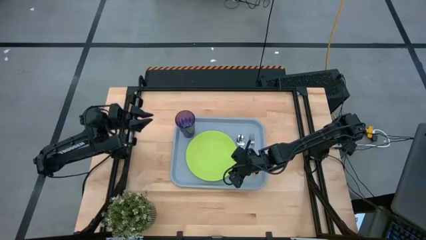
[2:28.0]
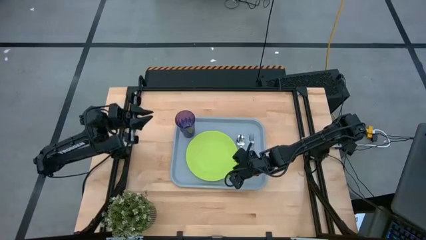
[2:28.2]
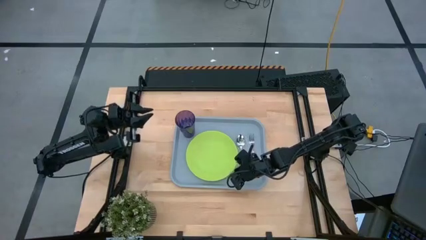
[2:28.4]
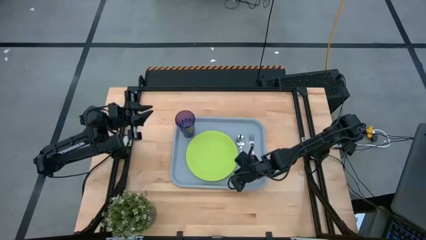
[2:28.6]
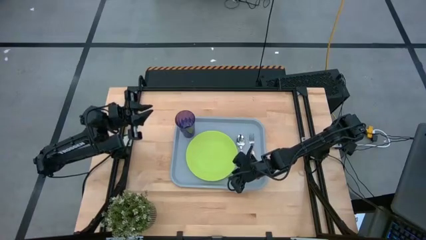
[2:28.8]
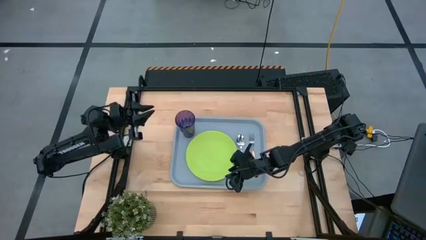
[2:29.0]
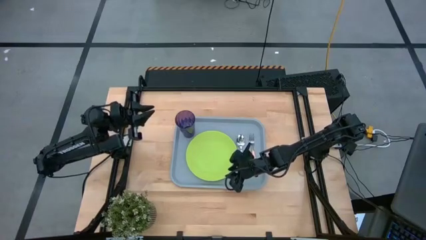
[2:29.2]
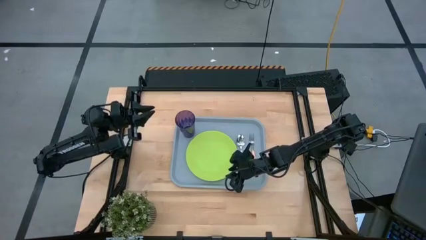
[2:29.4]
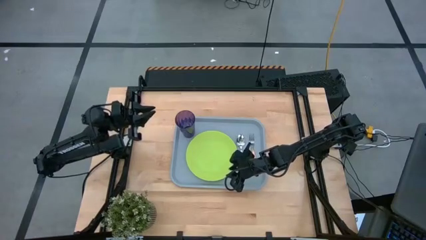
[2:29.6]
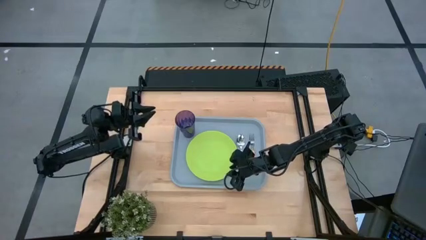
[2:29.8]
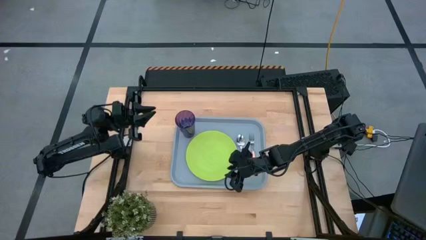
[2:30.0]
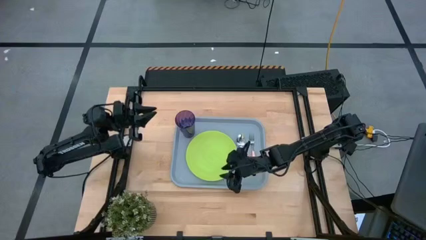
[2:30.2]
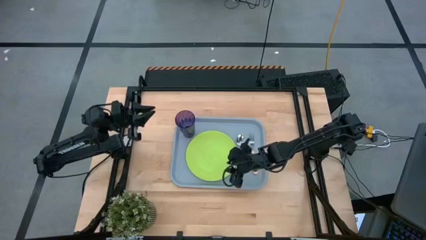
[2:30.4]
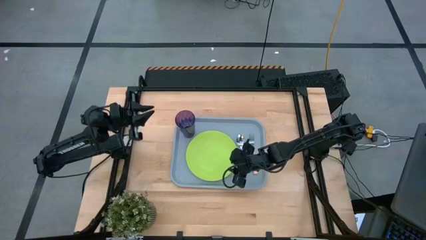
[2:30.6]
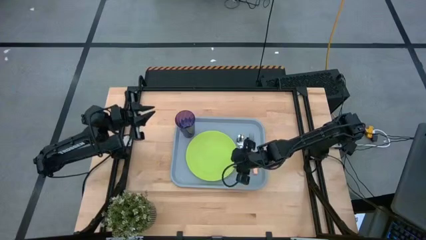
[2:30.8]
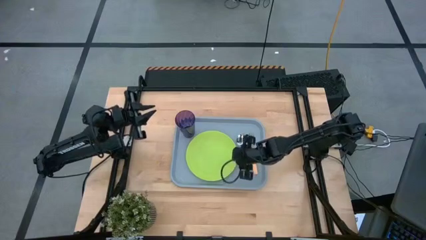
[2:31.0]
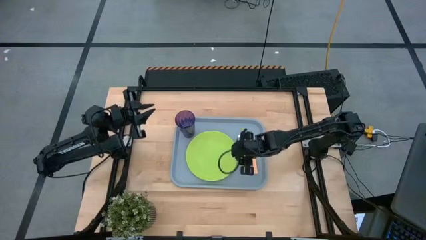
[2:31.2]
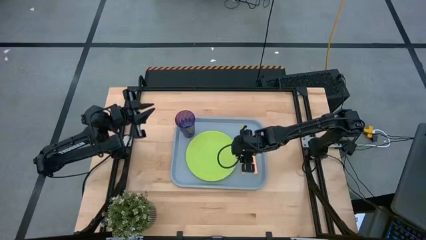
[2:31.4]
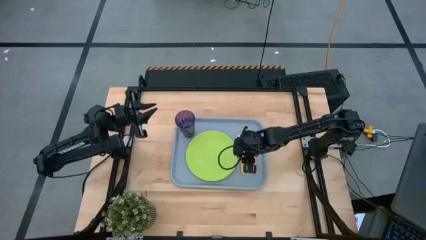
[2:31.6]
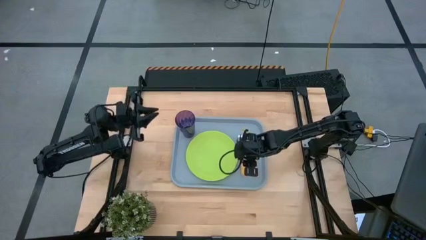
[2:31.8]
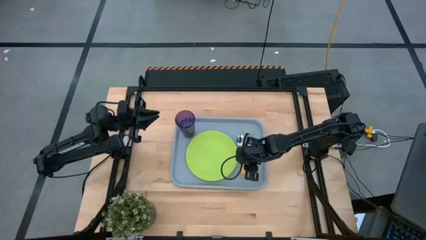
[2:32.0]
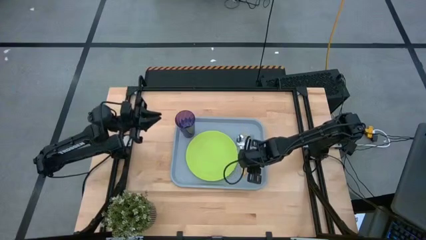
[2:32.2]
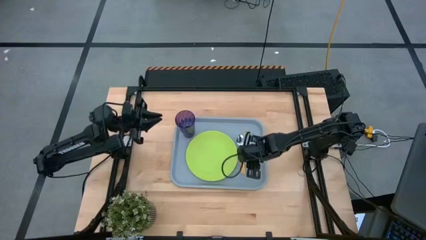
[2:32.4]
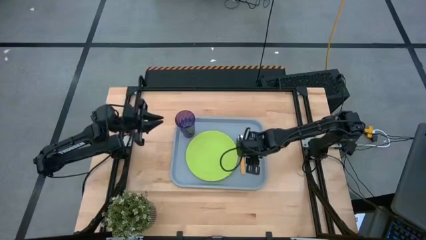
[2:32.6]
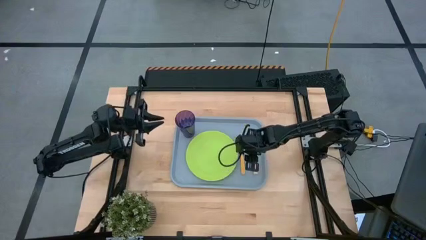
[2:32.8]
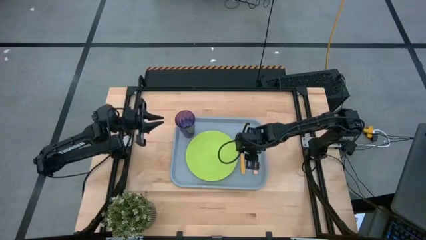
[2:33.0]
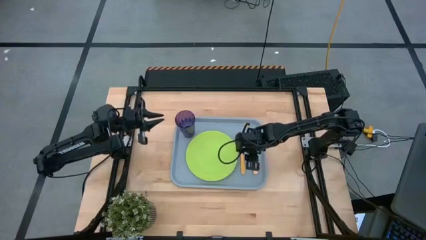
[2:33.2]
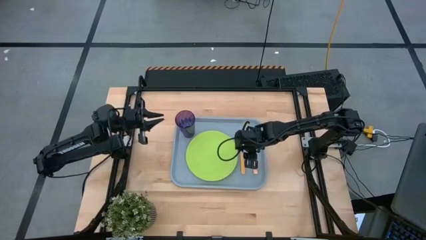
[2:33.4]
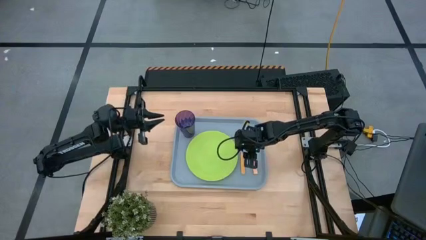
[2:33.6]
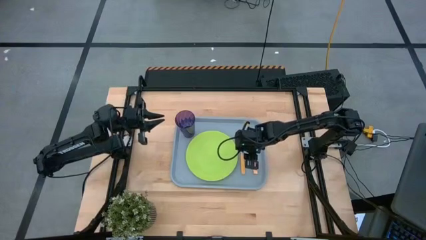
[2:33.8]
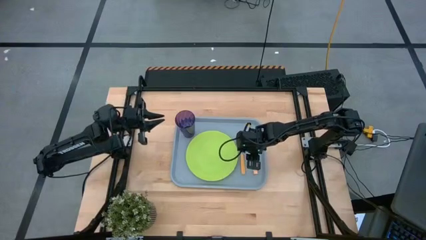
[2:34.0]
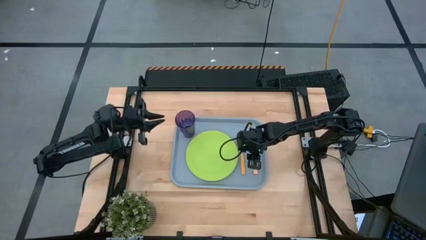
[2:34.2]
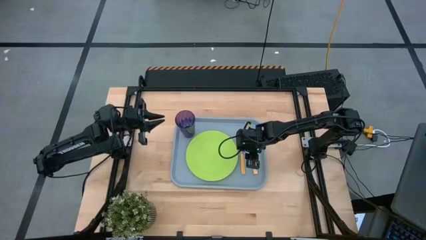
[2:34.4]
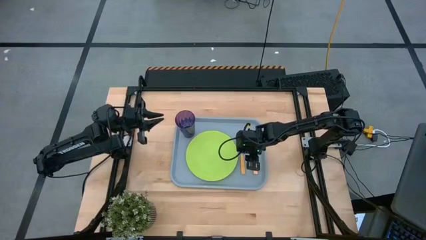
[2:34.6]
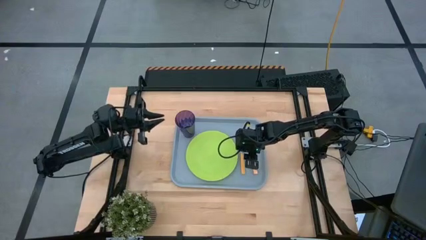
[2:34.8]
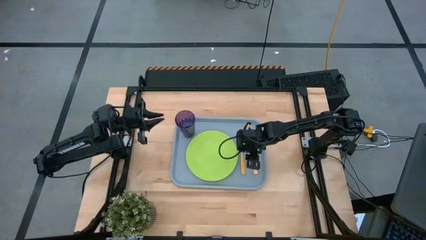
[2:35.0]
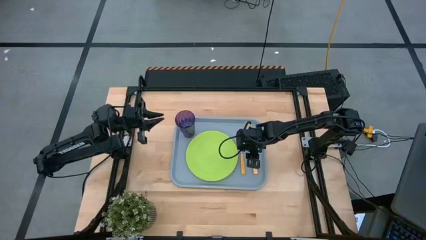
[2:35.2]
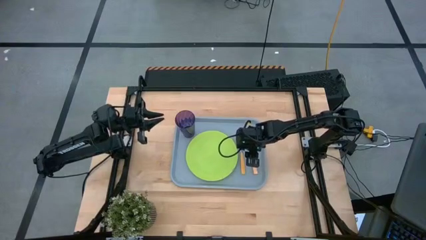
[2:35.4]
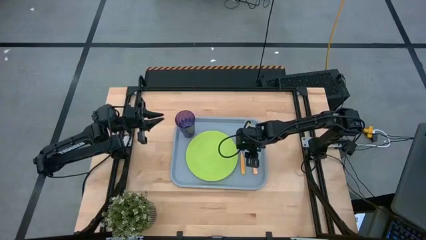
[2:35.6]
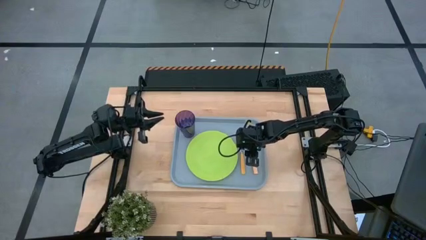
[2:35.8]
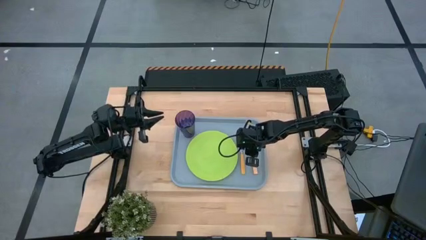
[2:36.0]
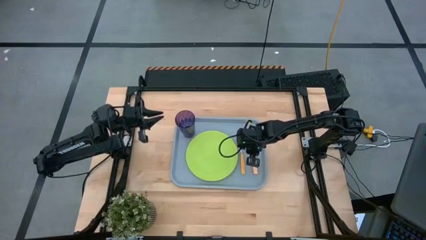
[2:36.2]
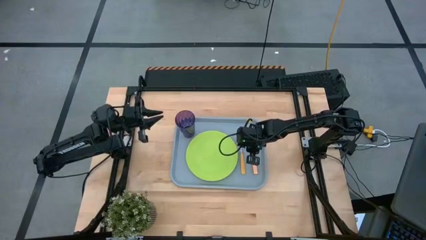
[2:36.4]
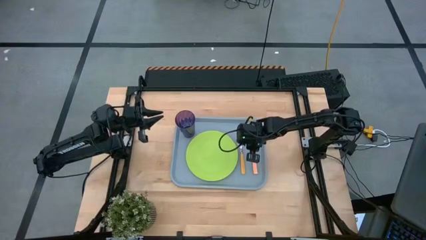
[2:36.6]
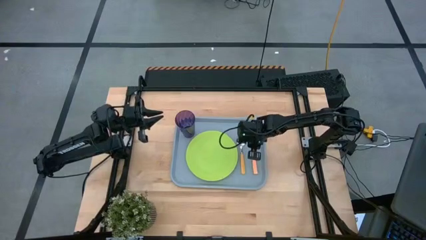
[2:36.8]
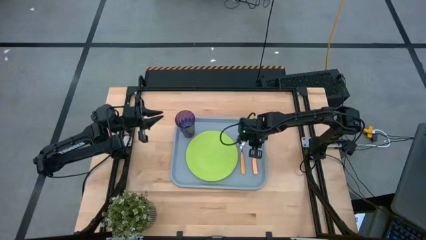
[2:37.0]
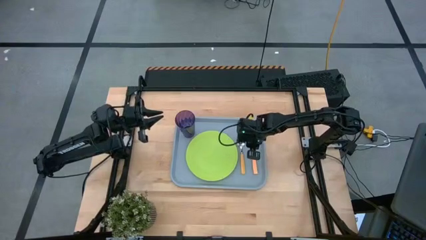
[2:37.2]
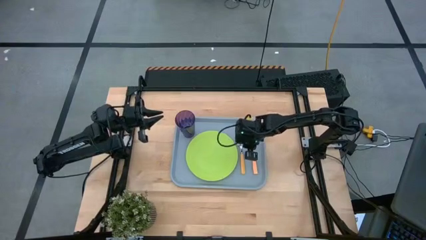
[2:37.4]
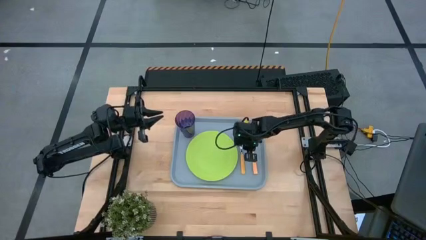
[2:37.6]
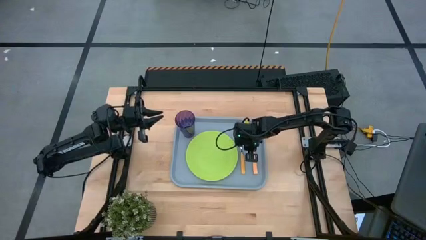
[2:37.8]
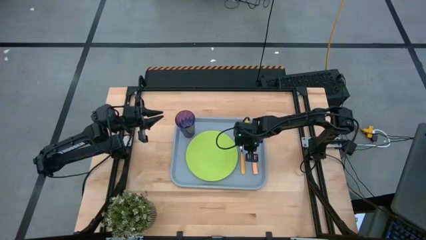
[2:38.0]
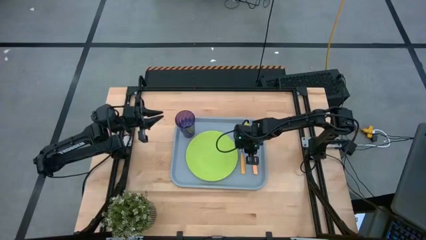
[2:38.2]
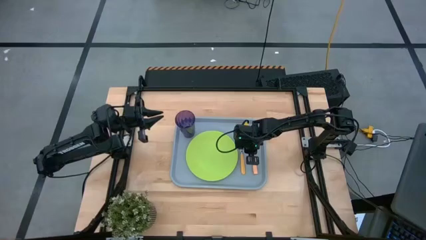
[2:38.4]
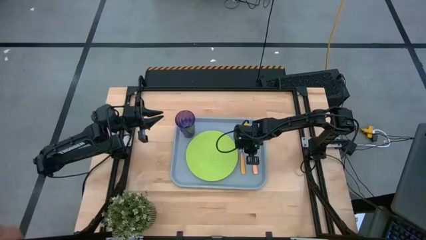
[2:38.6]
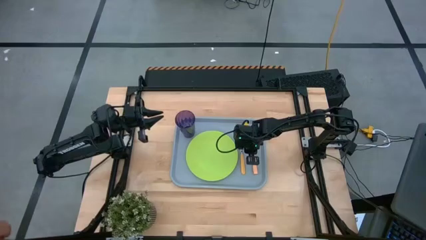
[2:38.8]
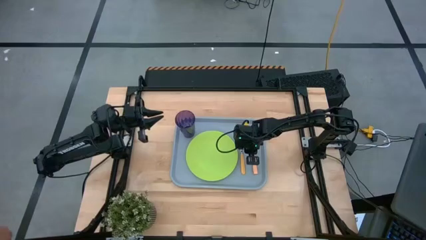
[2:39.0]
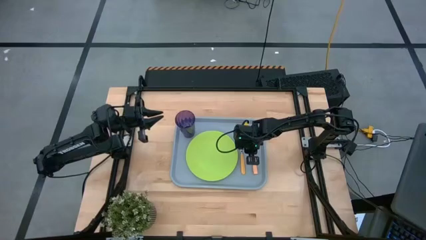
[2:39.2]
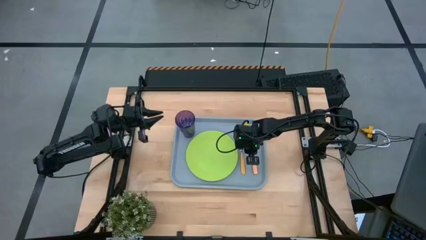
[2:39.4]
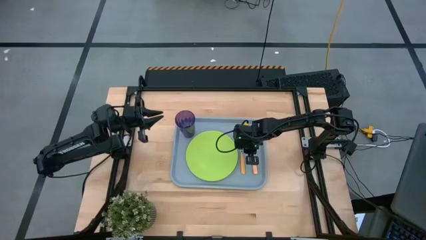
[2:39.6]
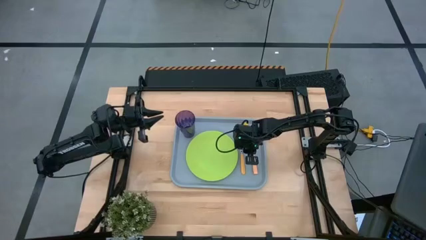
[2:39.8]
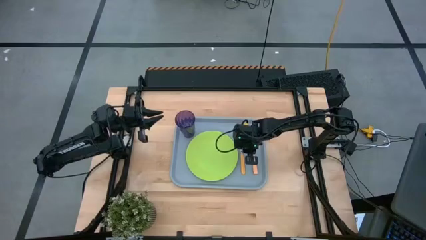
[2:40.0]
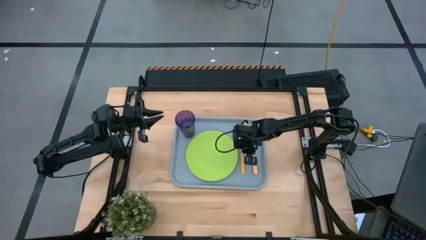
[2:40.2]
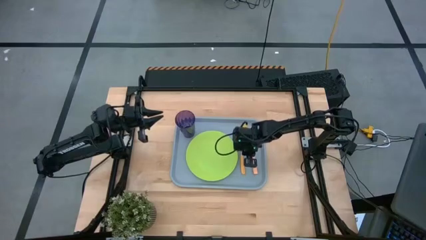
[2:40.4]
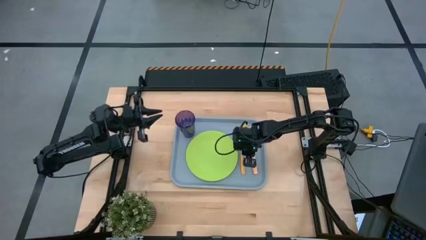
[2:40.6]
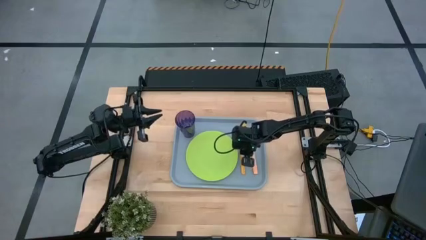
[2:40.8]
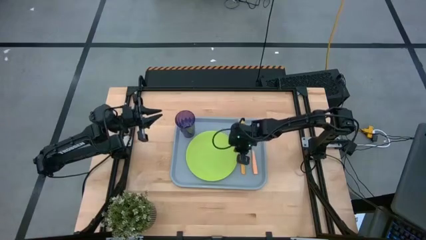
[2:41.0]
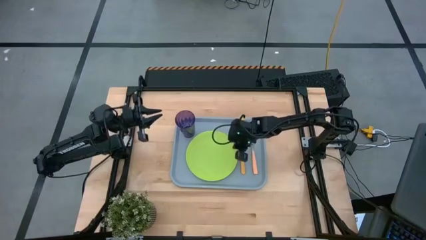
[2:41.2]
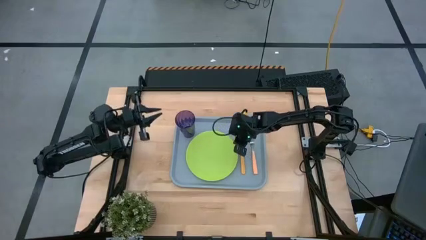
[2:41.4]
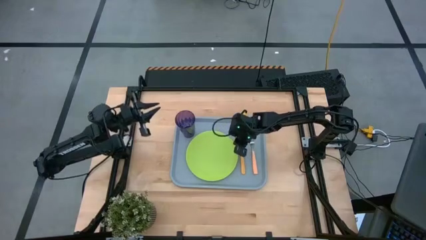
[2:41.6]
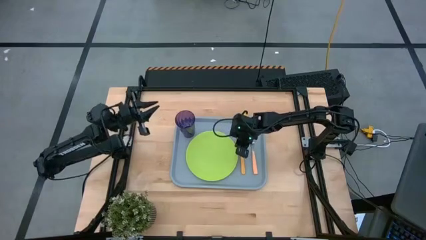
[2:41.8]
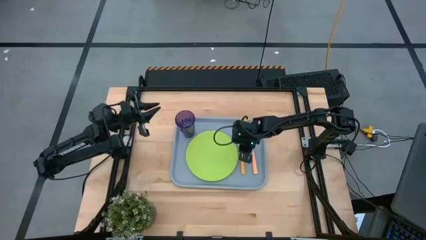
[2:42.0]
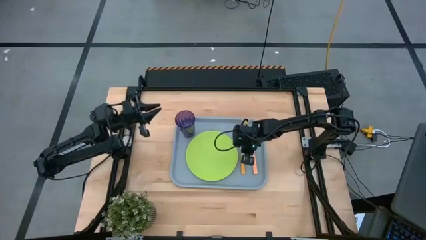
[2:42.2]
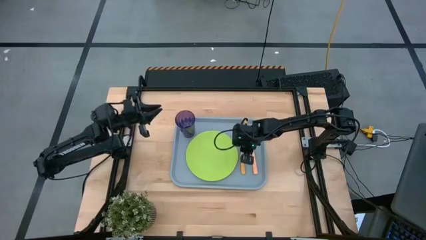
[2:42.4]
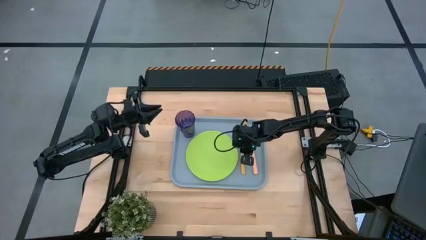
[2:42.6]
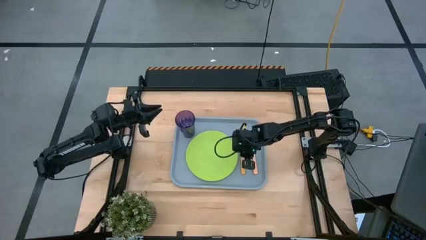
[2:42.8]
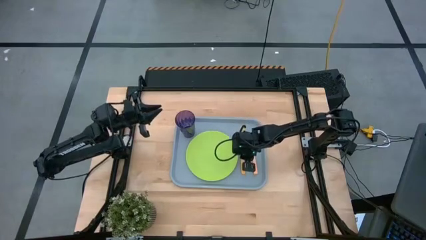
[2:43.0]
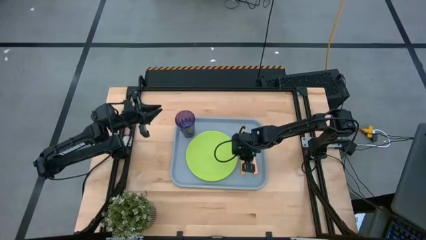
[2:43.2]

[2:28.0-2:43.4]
Task: Pick and place plate/cup/fork/spoon on tray
Adjust the orange spoon and gray serving tray

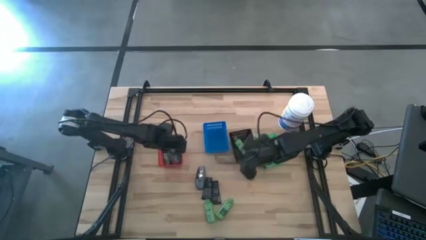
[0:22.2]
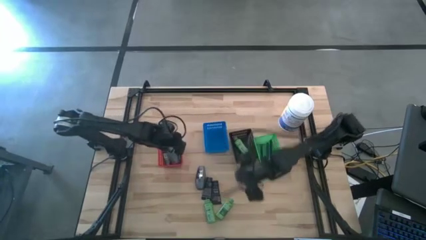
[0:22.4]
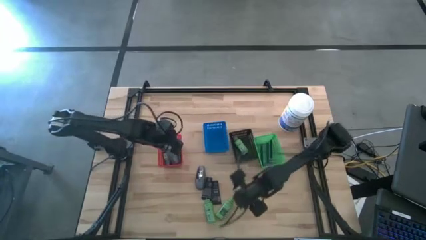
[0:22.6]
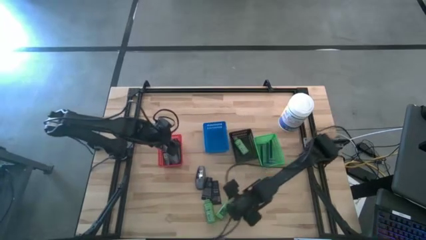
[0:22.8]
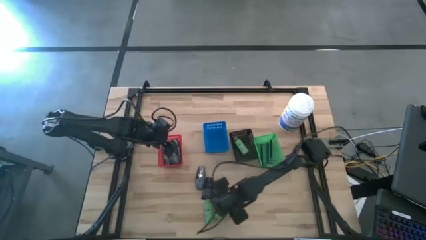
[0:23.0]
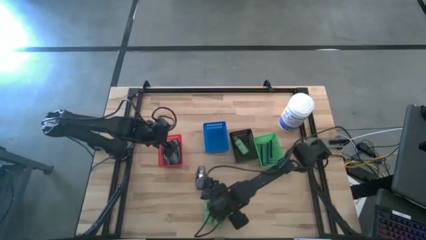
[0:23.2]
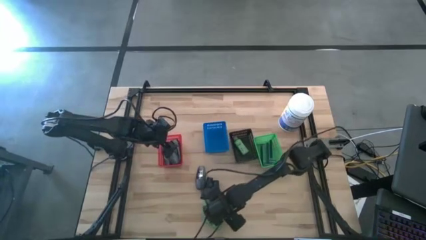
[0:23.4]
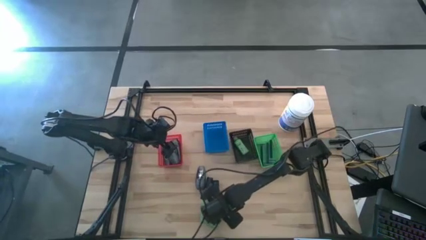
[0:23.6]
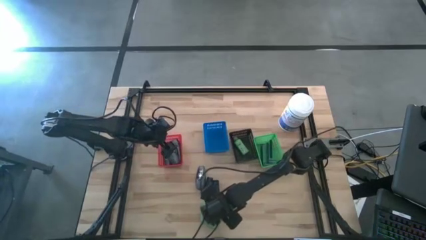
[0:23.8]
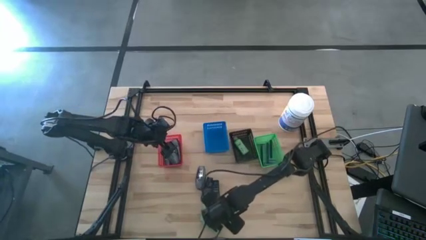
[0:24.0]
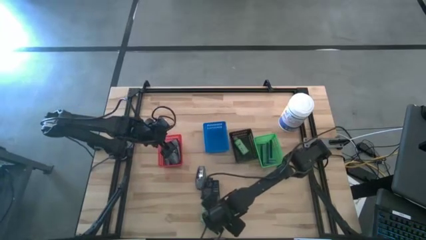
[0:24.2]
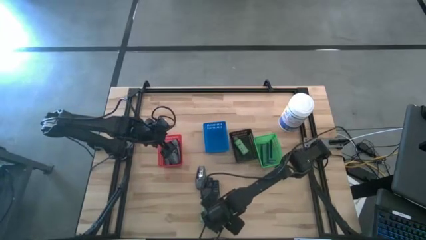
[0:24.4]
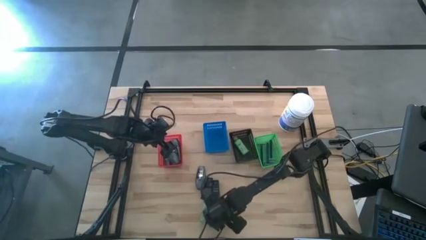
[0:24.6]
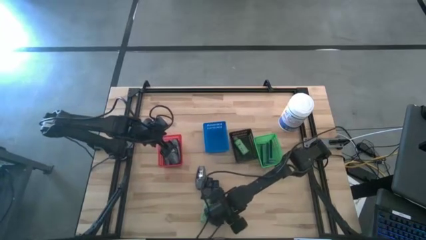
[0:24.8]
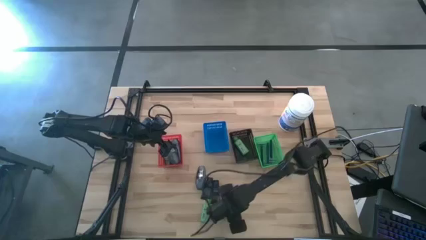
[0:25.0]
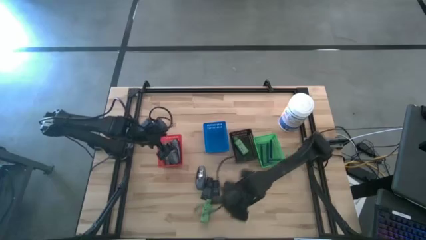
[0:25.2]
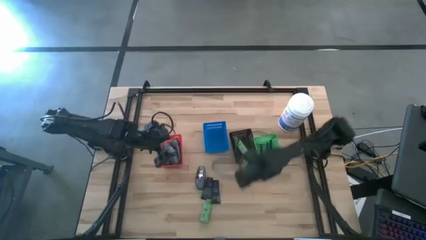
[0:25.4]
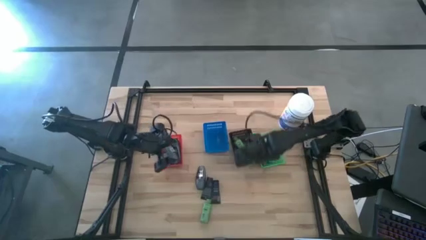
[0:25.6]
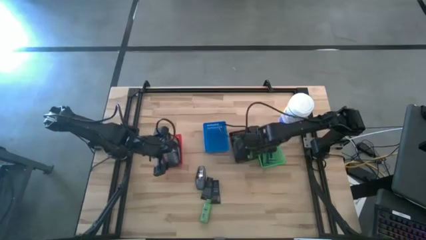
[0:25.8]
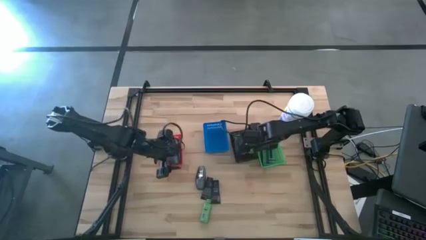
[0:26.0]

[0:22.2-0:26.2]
Task: Pick & Place Travel size toiletries
Put the green shampoo into the black bin
